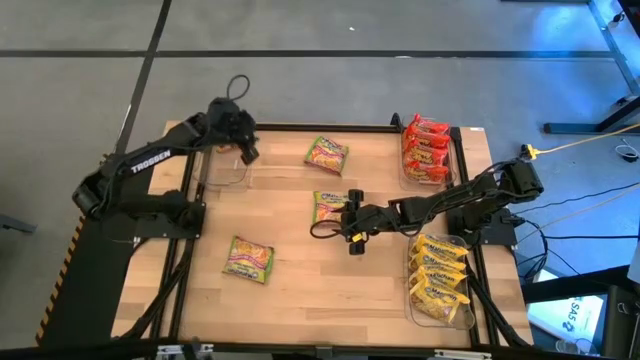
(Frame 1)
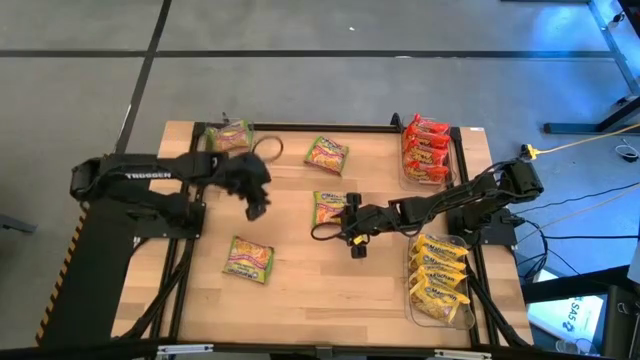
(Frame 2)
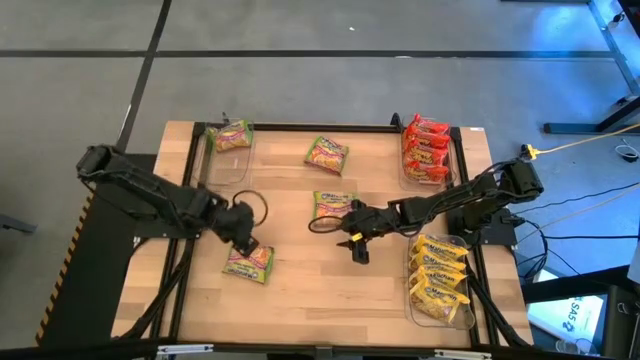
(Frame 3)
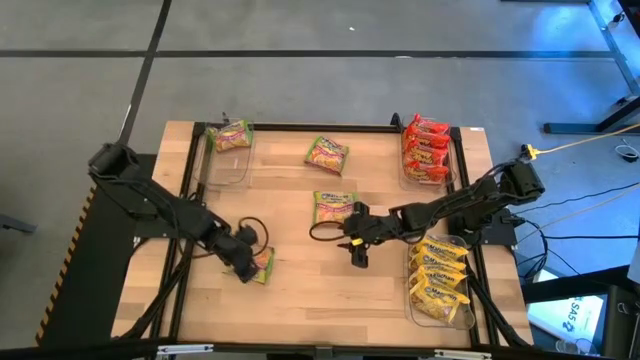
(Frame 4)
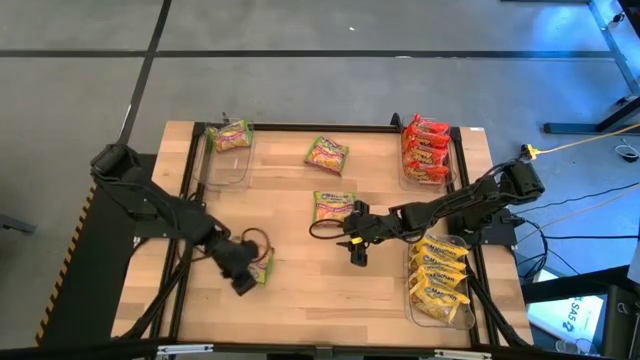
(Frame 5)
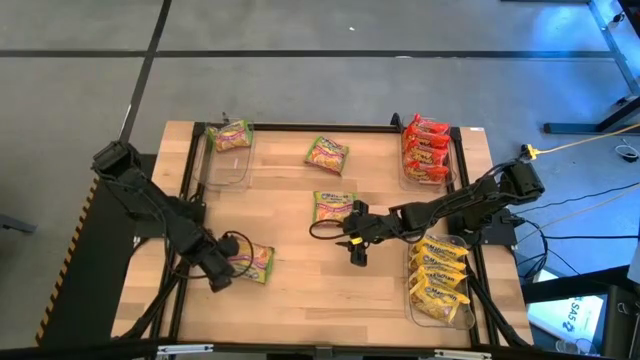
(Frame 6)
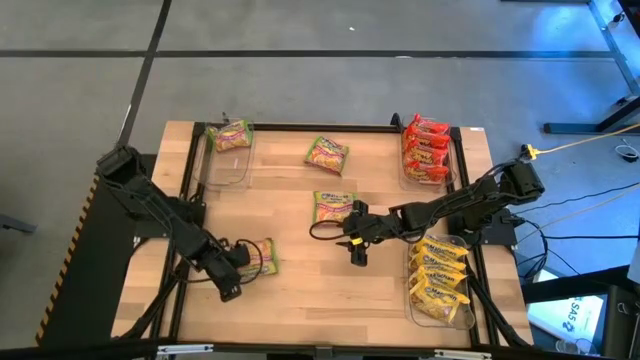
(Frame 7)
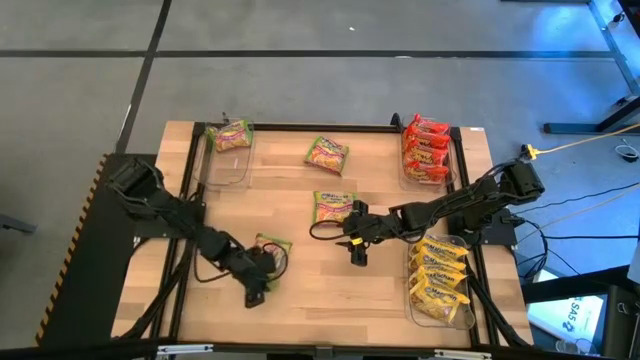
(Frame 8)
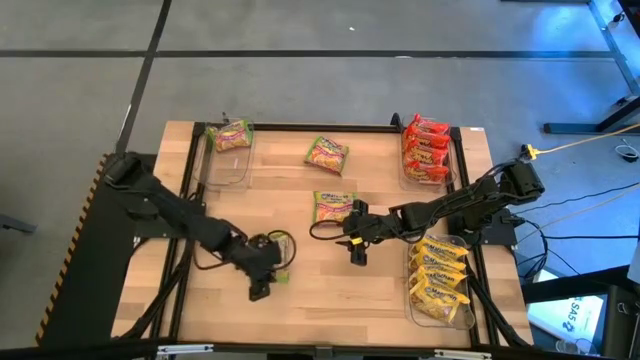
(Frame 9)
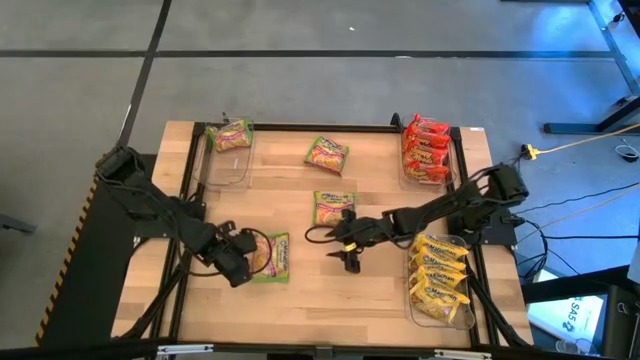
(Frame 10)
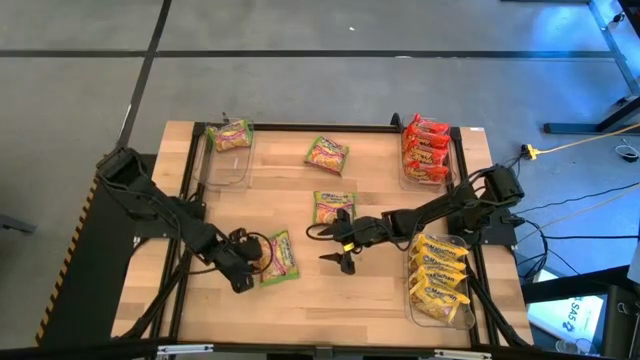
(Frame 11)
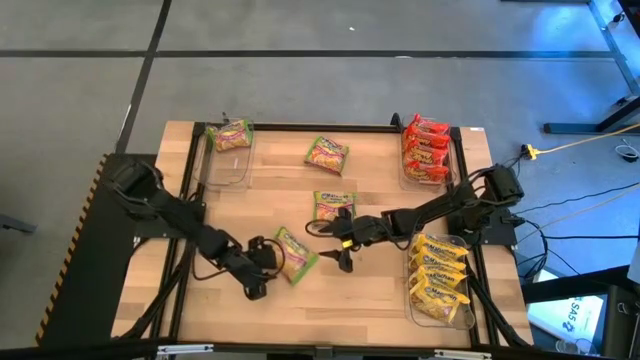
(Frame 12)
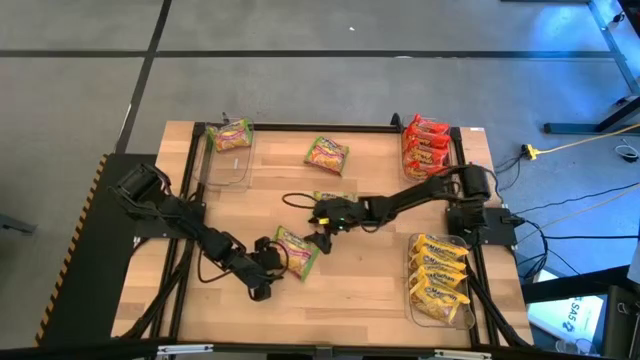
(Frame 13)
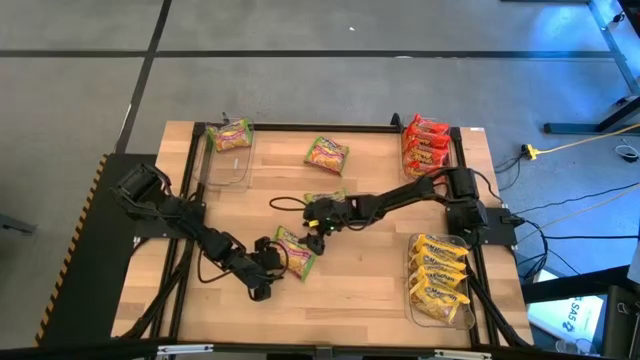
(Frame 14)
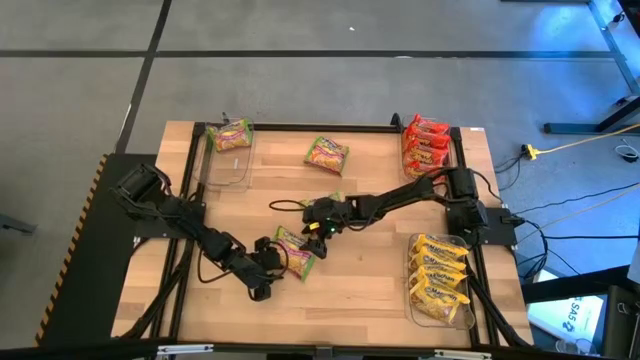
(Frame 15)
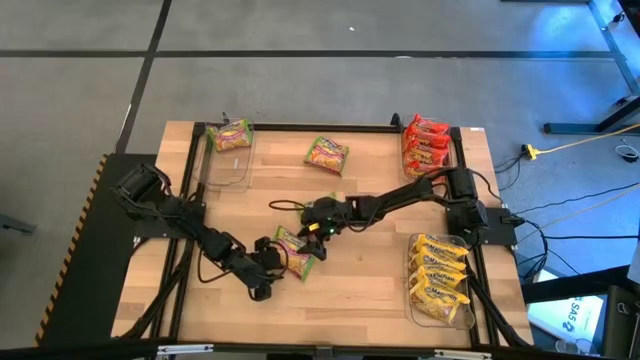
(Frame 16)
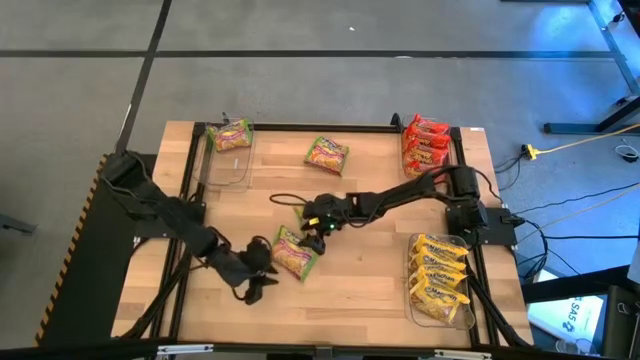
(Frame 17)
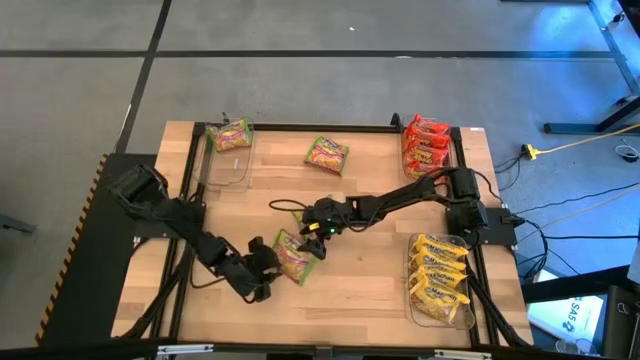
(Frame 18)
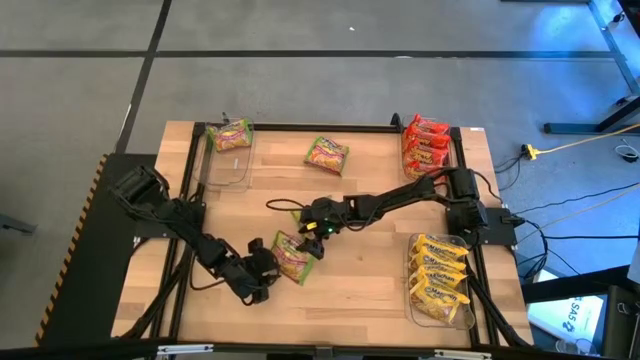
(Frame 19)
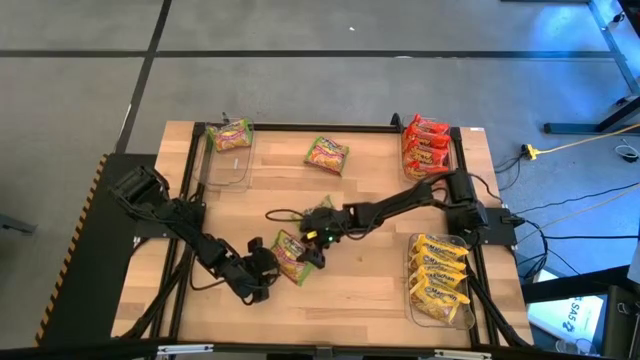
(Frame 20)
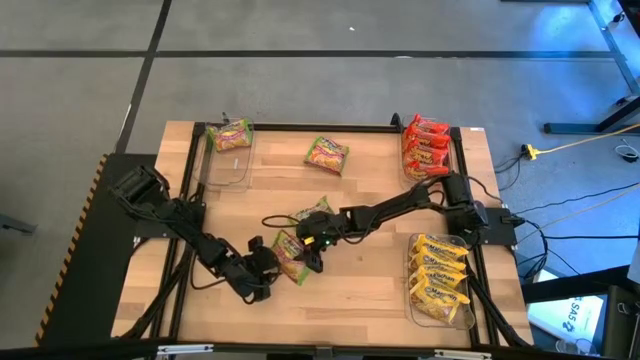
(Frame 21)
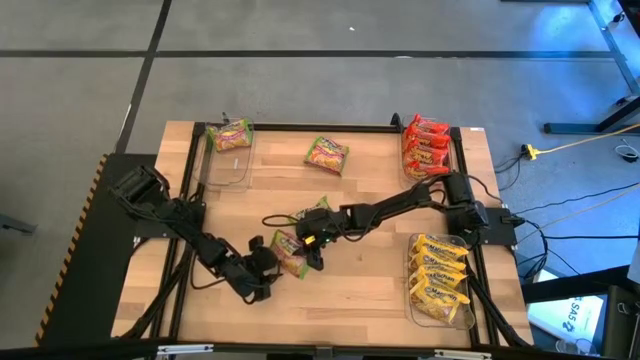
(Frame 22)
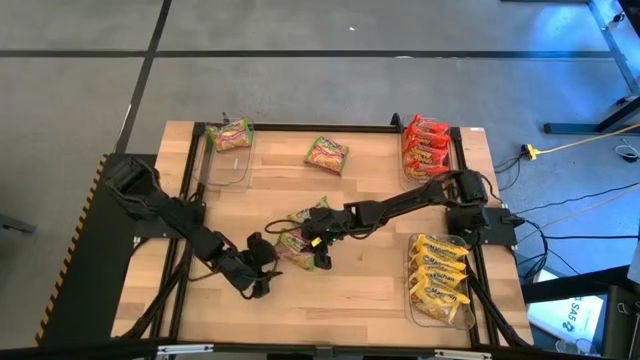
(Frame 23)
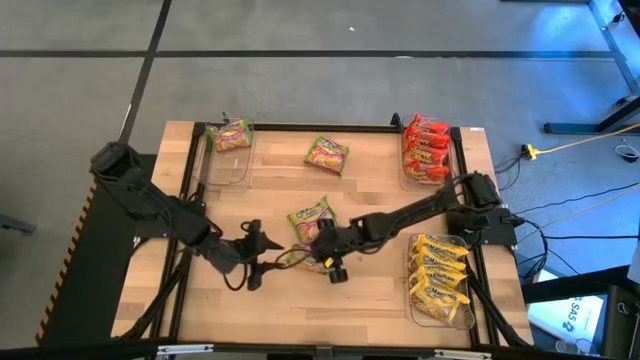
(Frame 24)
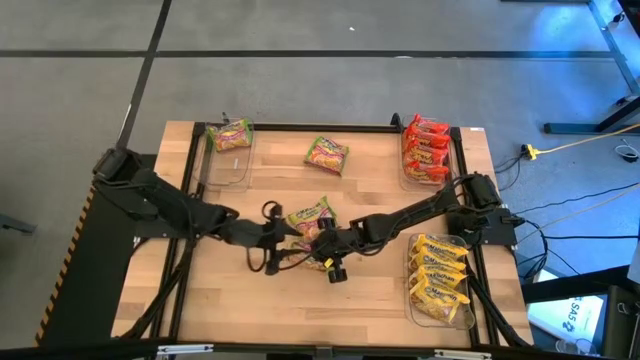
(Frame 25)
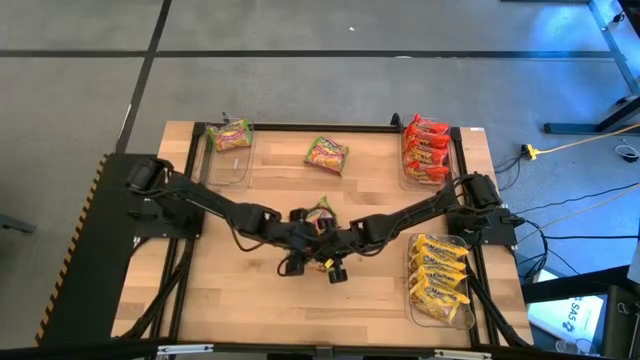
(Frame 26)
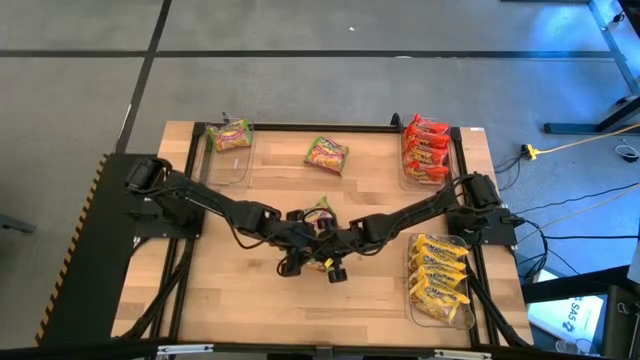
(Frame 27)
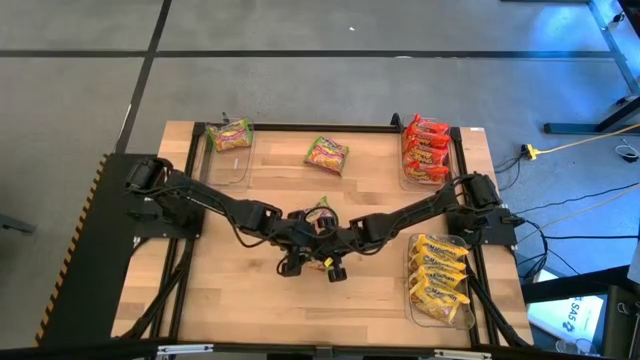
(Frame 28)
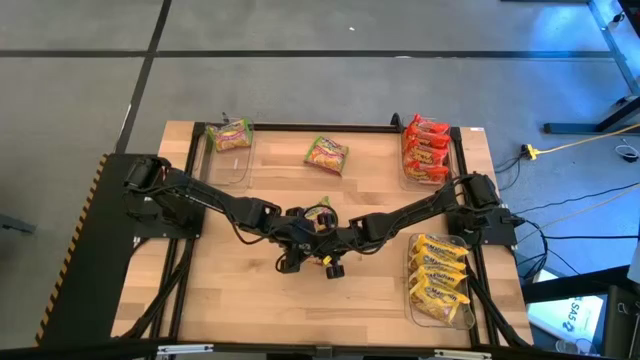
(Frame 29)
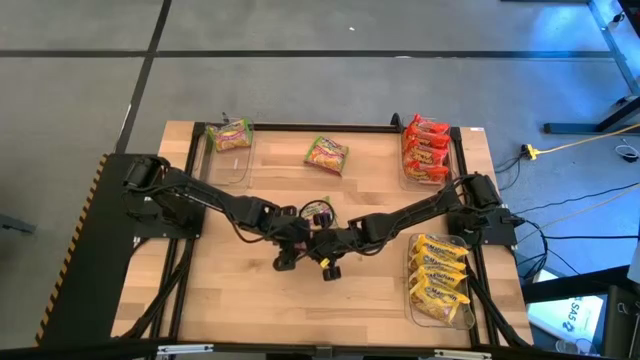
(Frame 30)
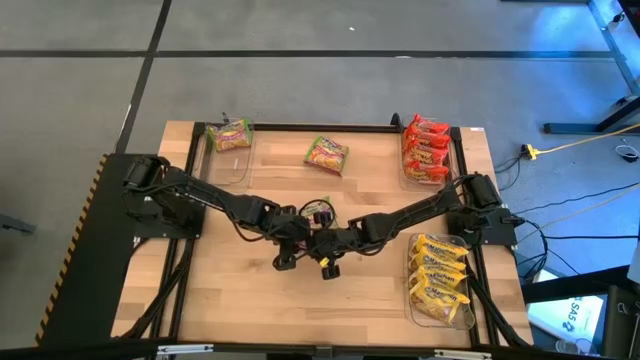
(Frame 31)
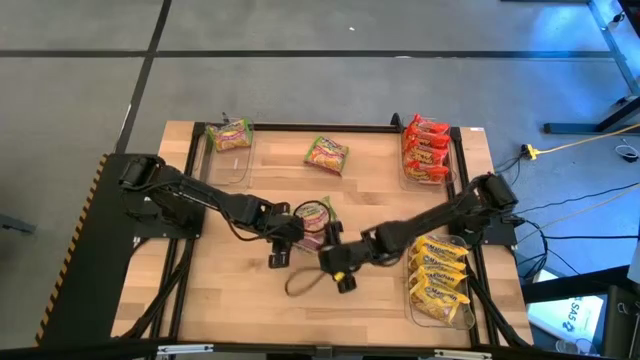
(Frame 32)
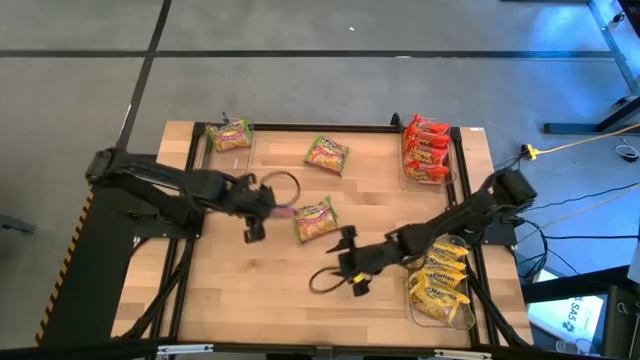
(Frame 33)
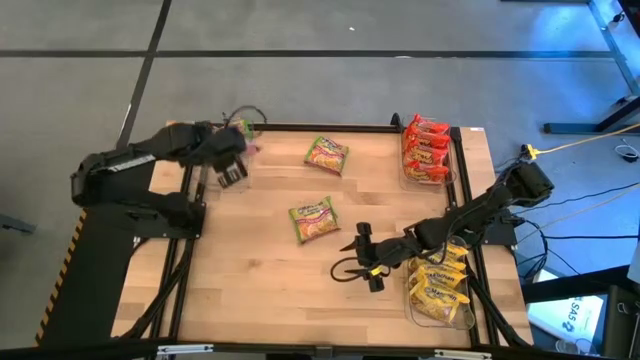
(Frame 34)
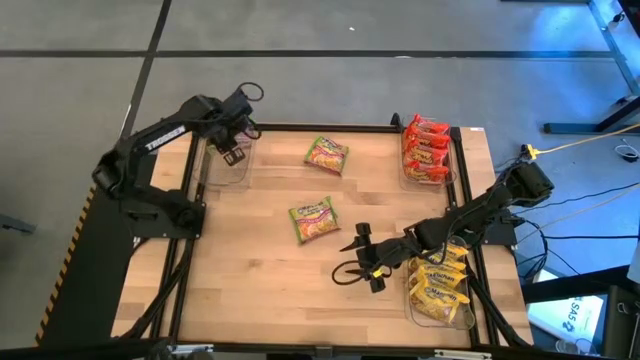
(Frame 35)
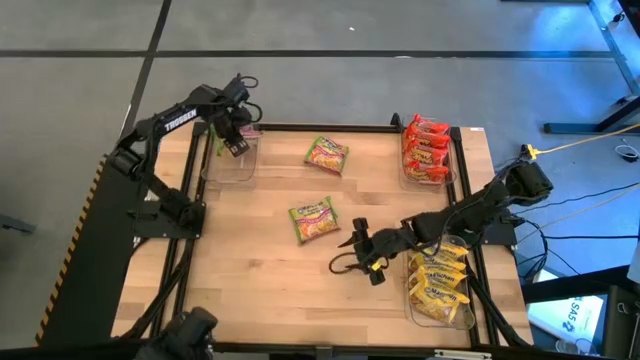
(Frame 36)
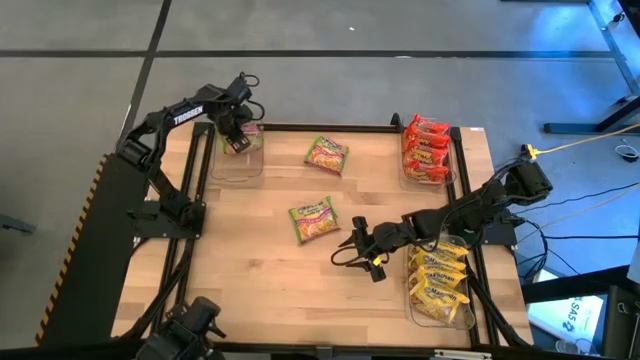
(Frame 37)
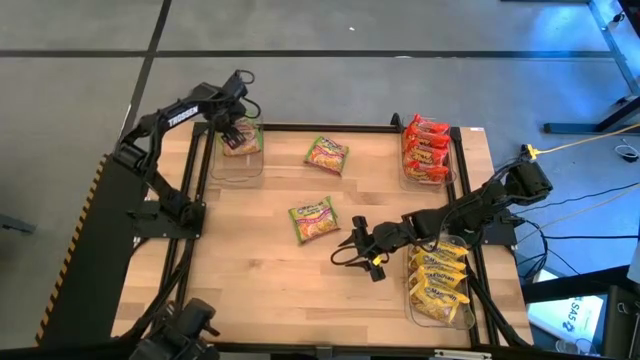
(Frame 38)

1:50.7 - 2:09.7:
Task: Sort Maruchan noodles
Put the green noodle pack into the top left transparent bin
